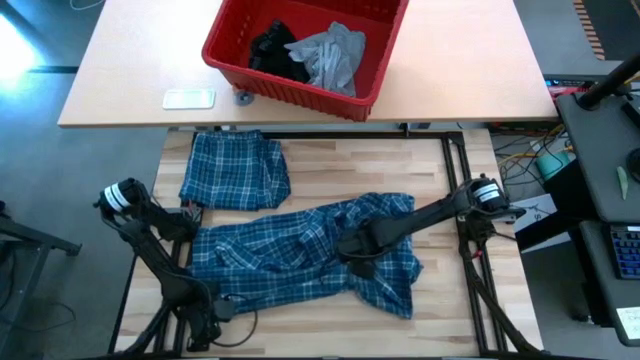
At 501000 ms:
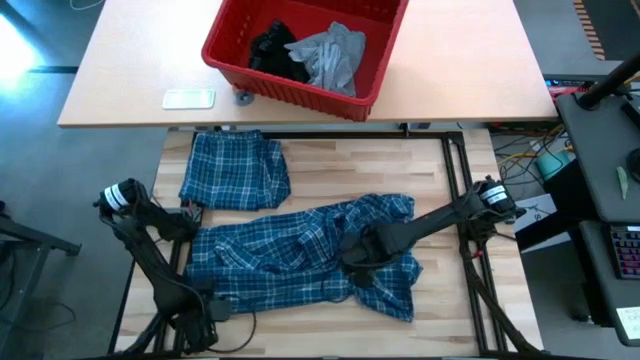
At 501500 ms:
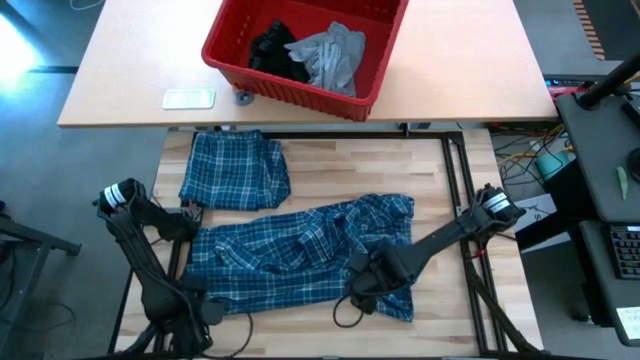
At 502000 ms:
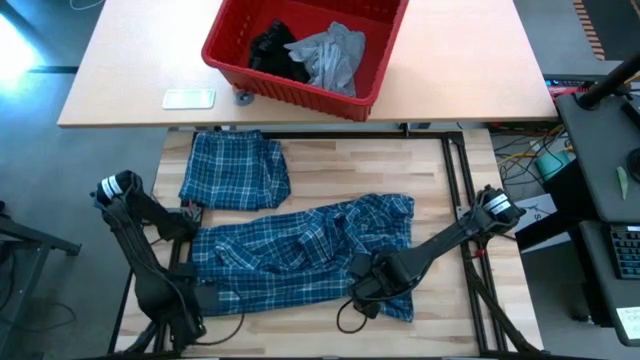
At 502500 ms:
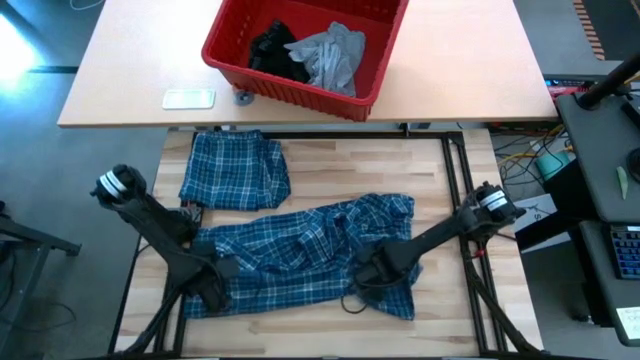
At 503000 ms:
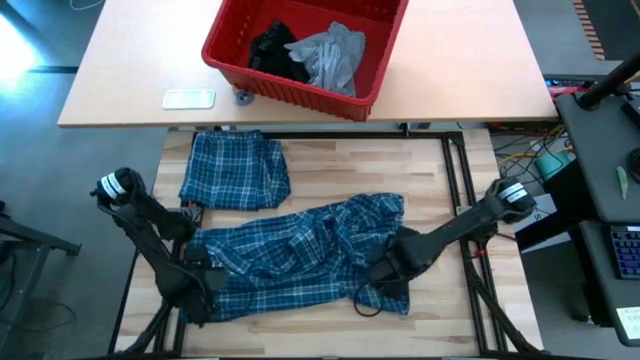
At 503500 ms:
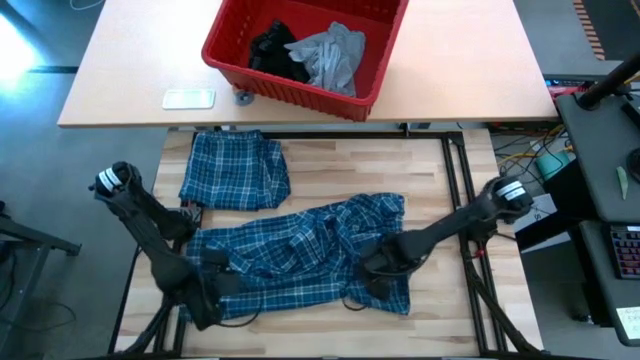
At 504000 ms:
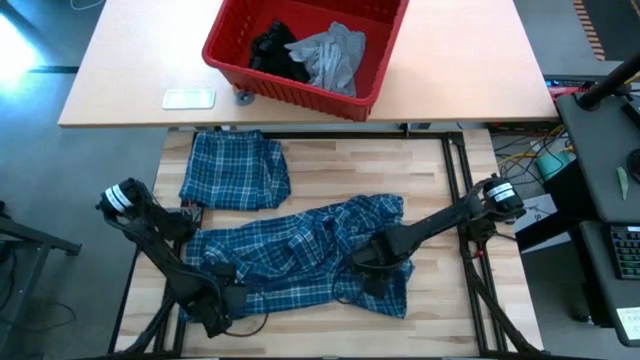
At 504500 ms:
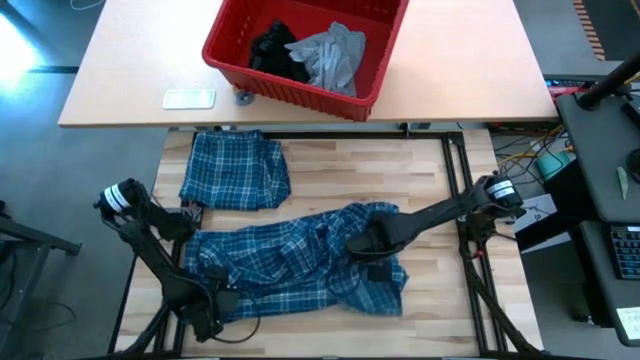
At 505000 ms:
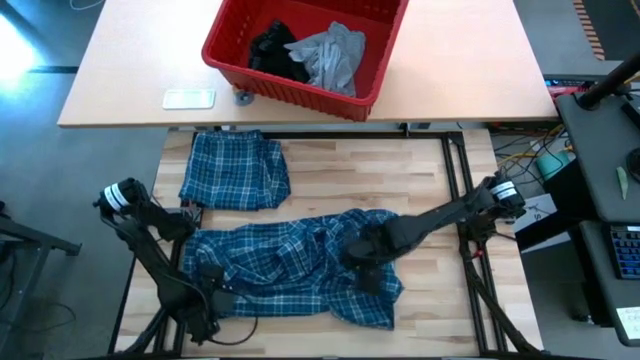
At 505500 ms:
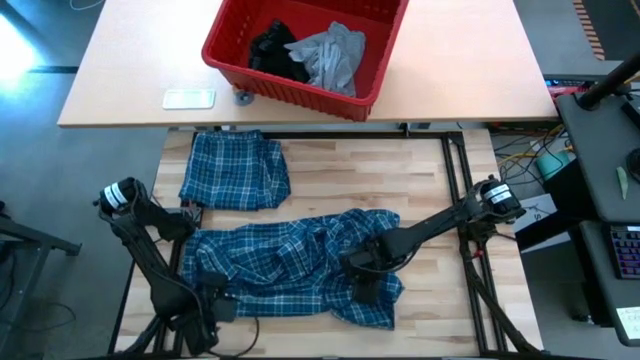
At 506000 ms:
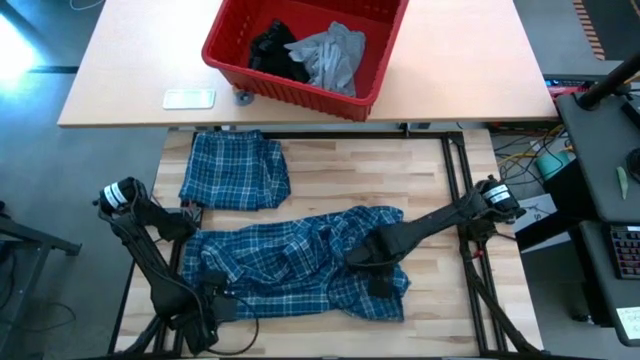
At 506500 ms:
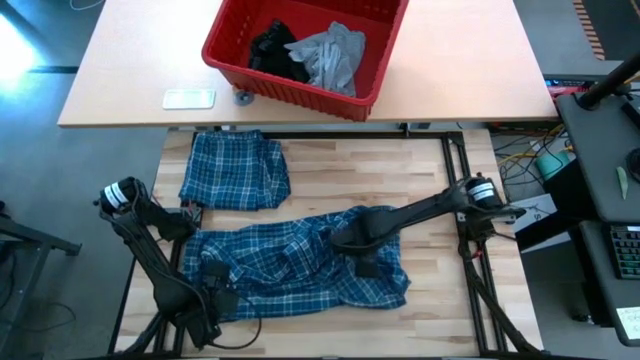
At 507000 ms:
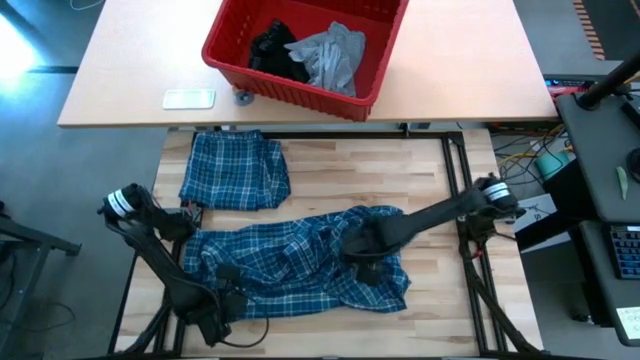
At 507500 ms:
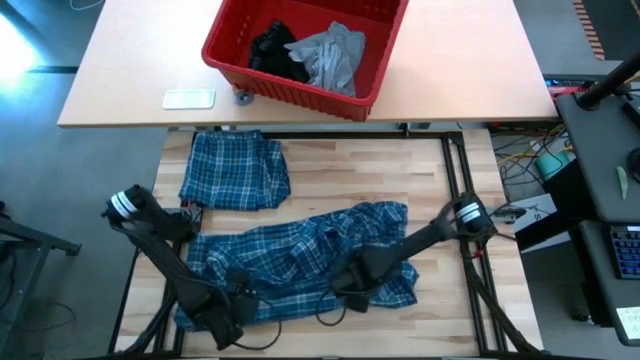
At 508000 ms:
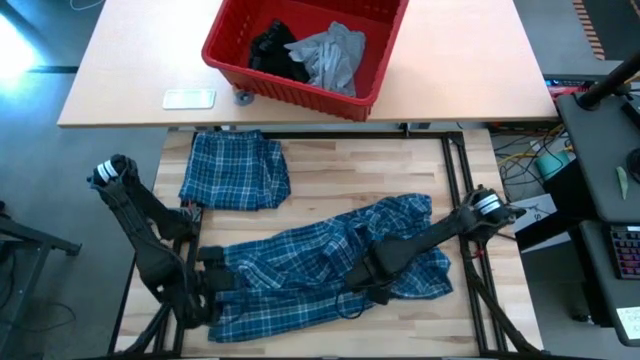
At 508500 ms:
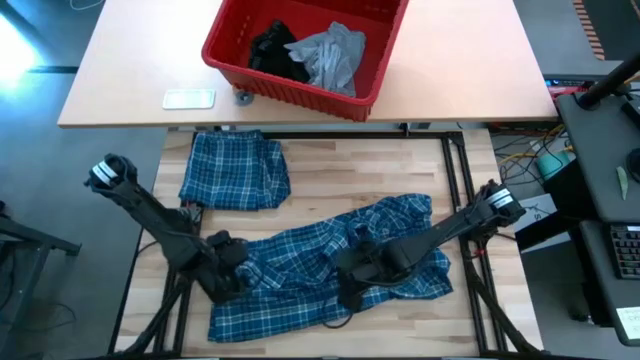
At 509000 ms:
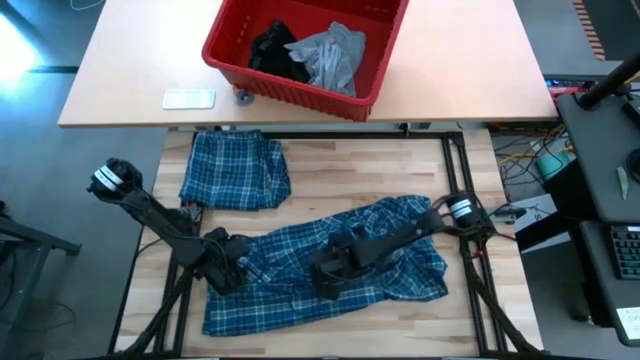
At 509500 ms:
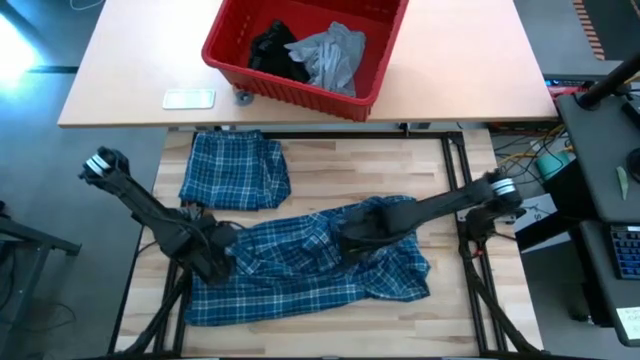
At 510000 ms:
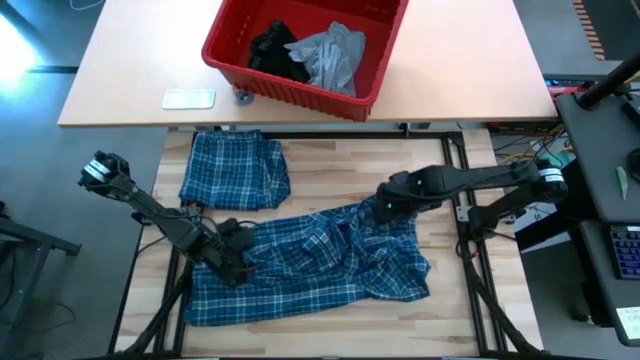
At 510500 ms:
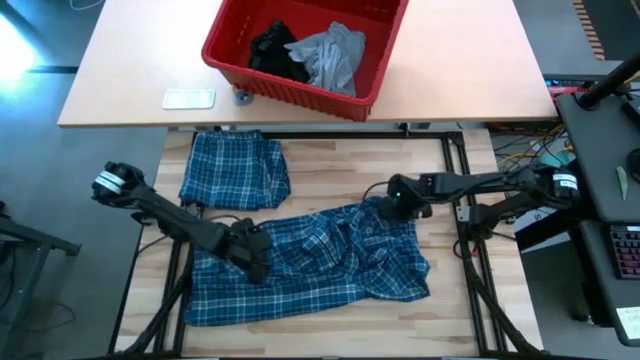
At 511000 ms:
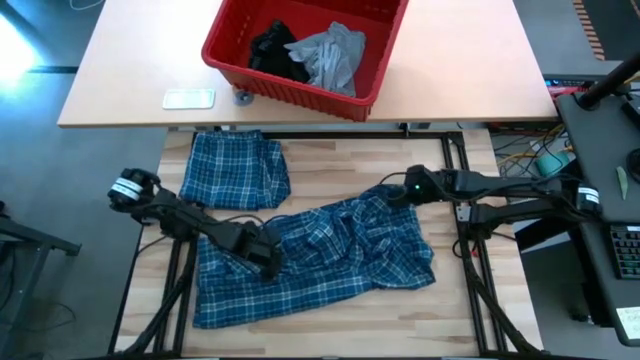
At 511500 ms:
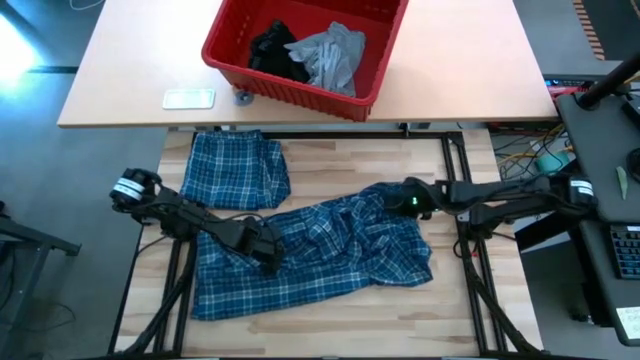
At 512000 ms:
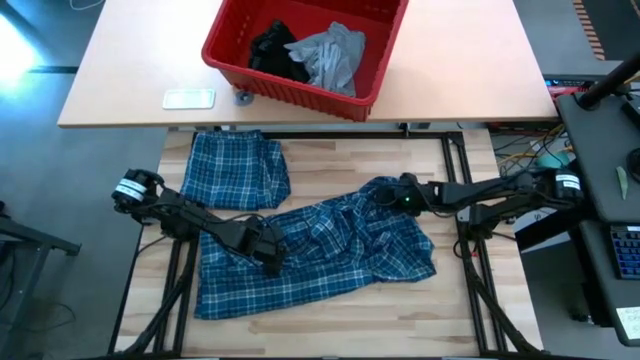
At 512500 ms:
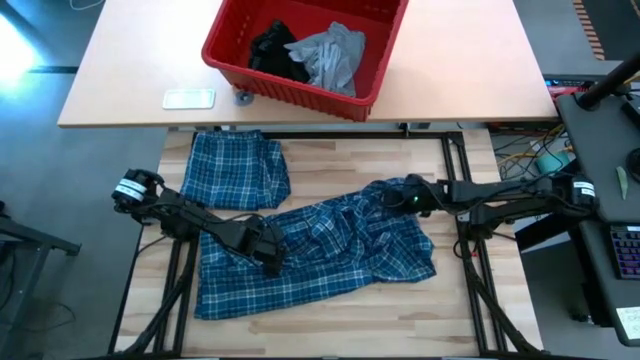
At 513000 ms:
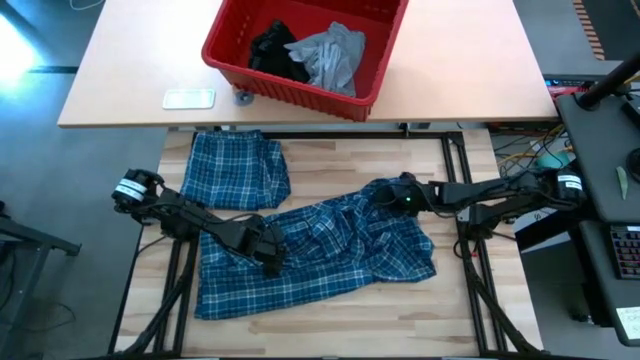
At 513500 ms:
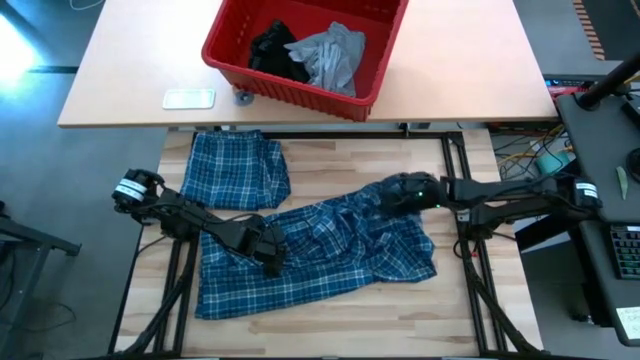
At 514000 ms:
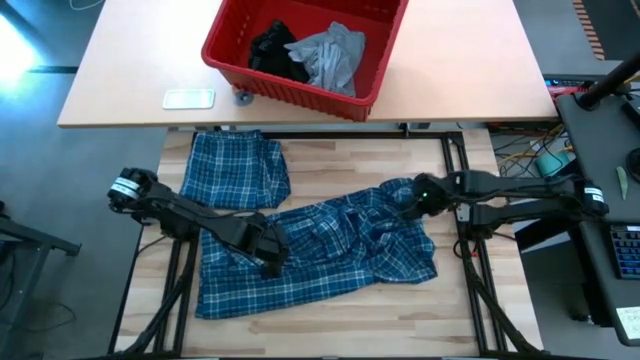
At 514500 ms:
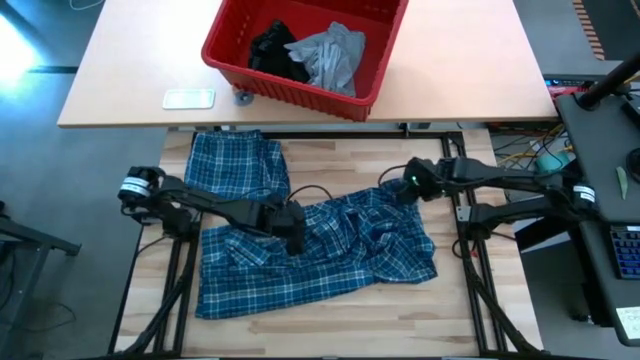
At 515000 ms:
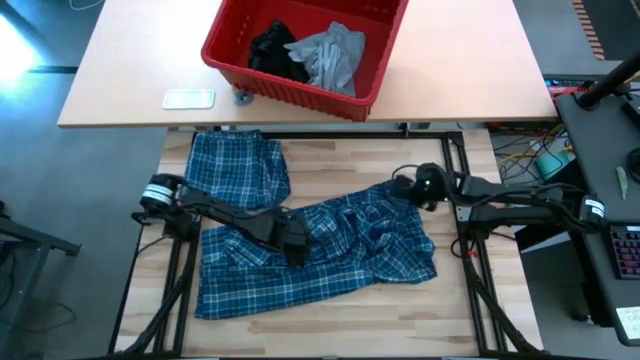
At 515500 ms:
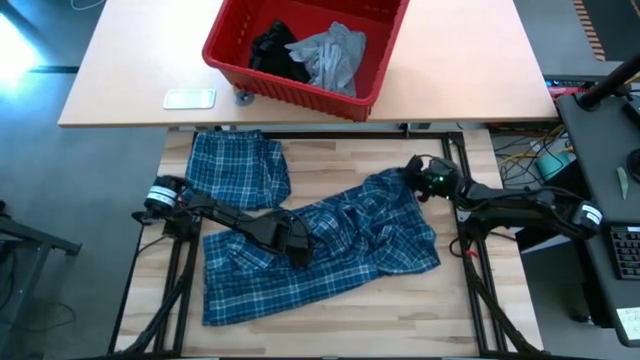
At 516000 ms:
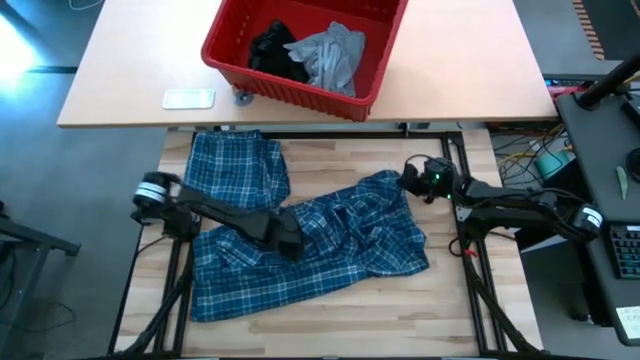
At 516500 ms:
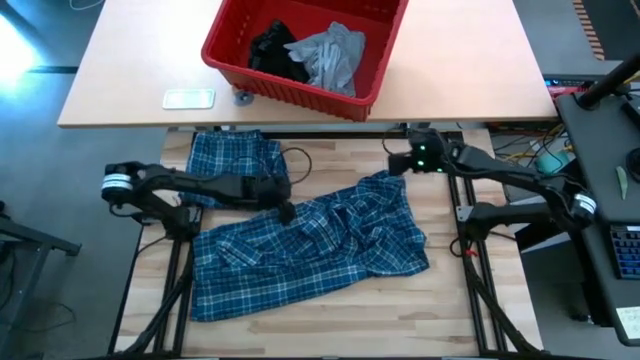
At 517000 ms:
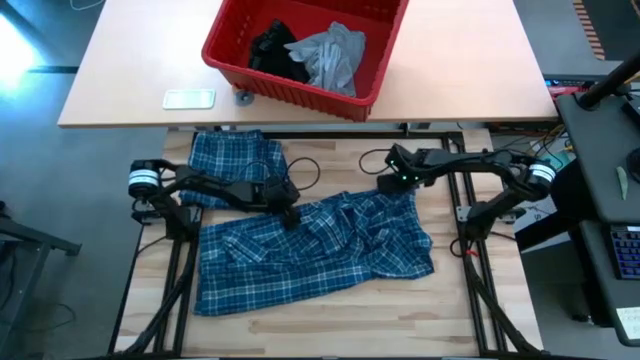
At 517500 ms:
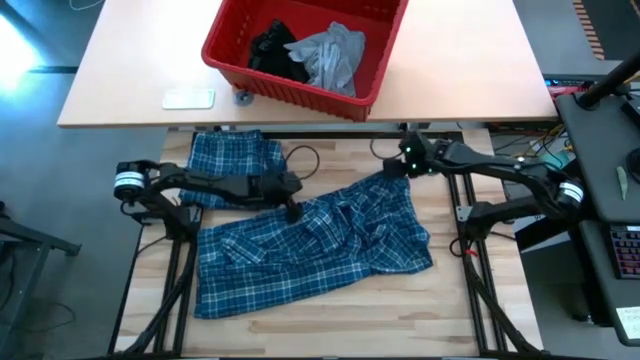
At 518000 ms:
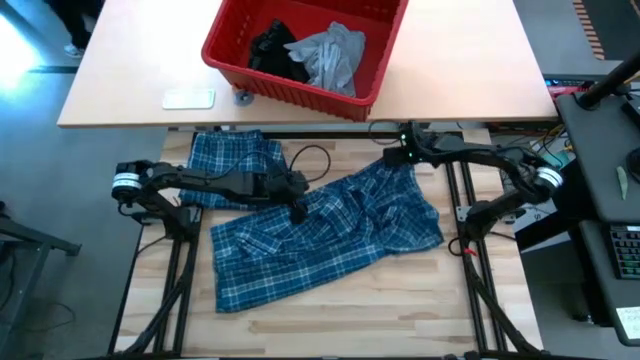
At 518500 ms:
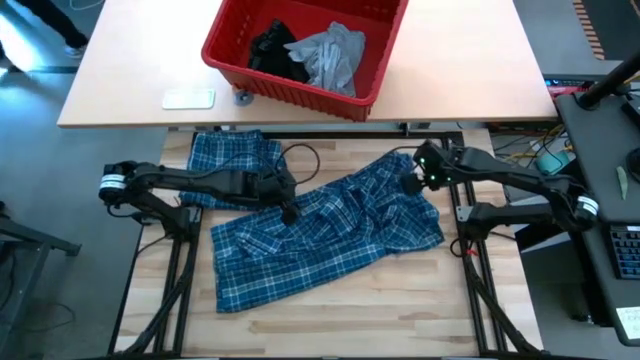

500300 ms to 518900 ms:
Task: Fold Laundry from Bin
Fold the blue patterned long sleeve shirt

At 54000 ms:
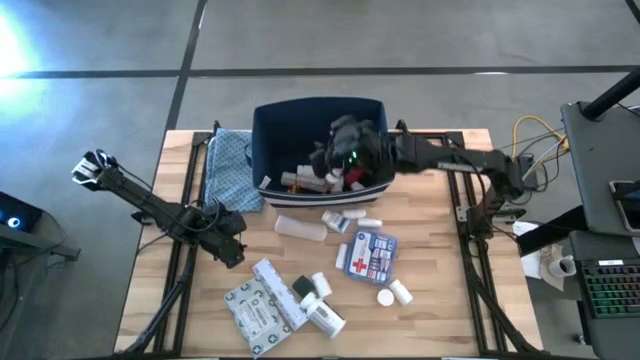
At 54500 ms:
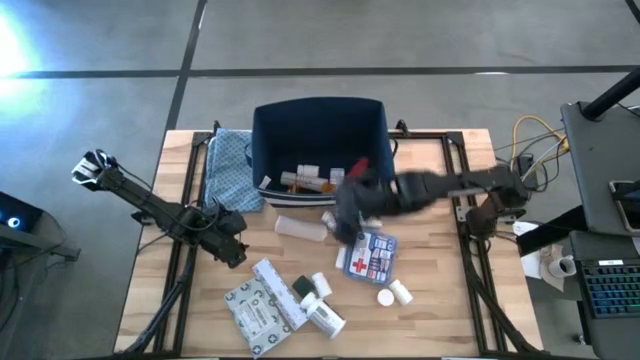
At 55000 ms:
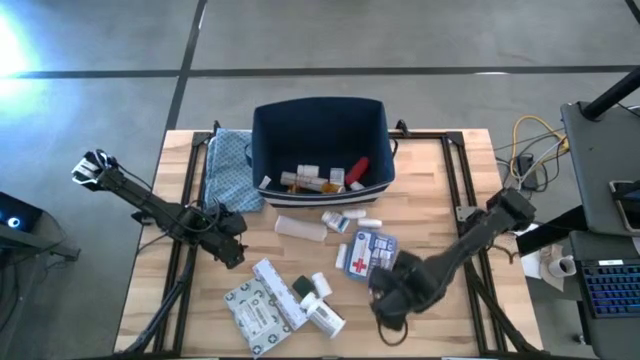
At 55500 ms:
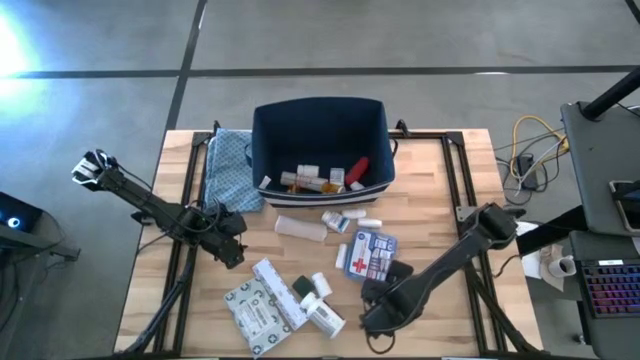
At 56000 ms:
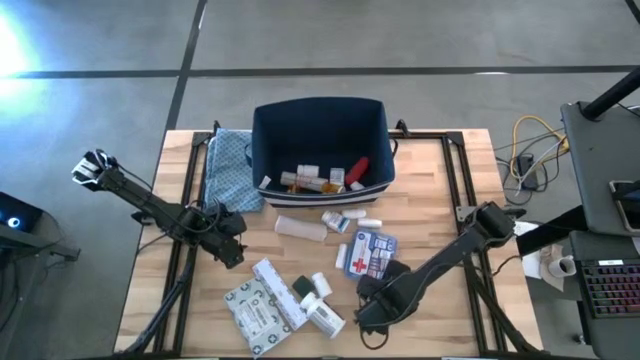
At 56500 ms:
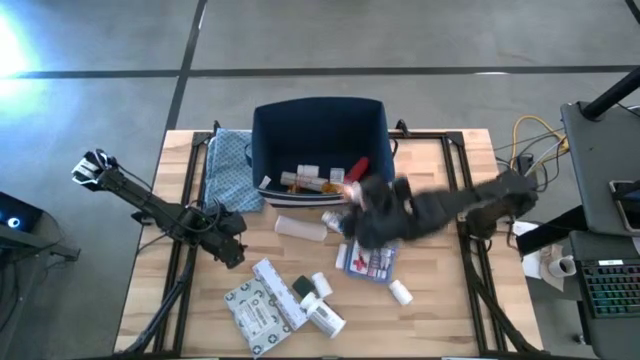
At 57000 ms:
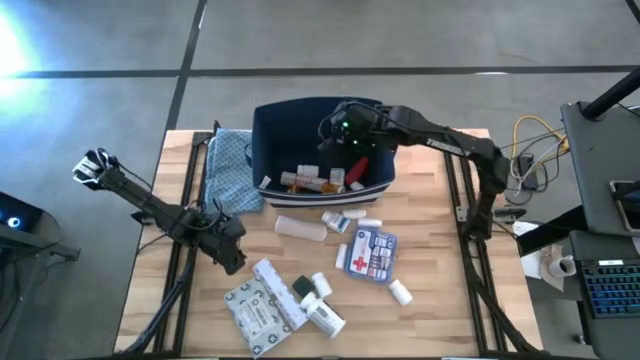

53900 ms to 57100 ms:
Task: Pick & place medical supplies in basket/bin
Put the orange pill bottle into the blue bin
